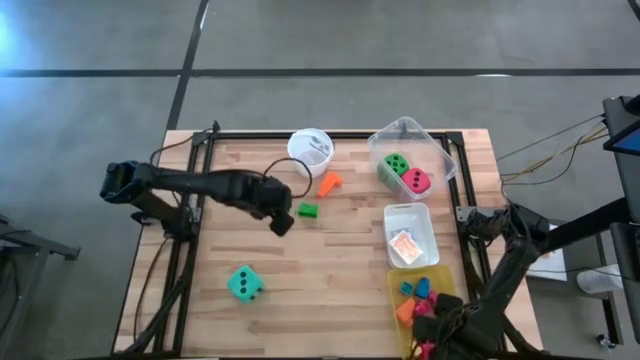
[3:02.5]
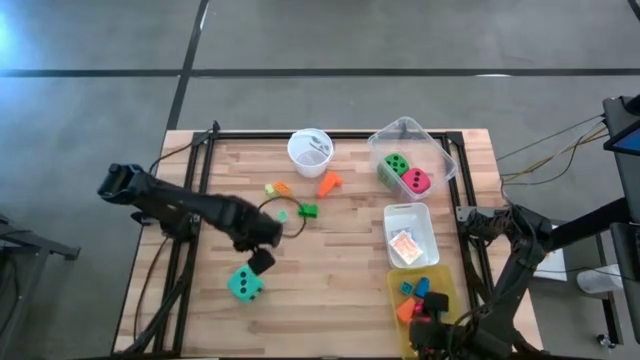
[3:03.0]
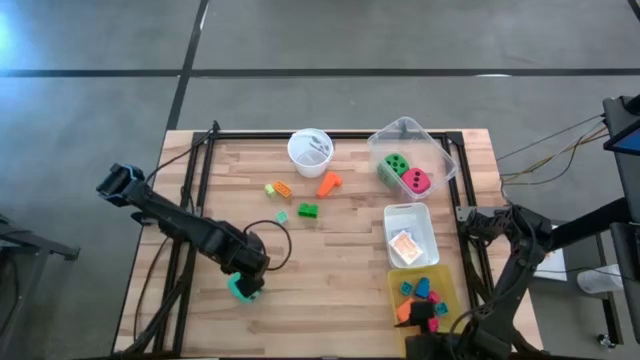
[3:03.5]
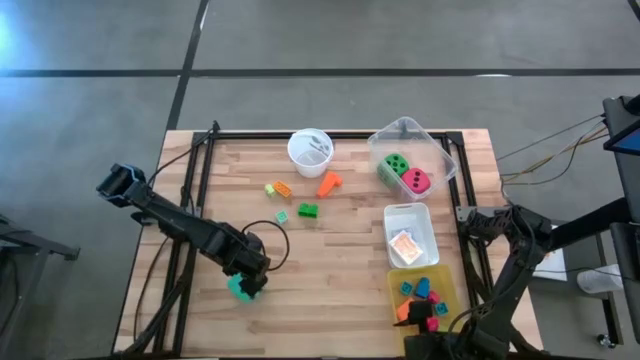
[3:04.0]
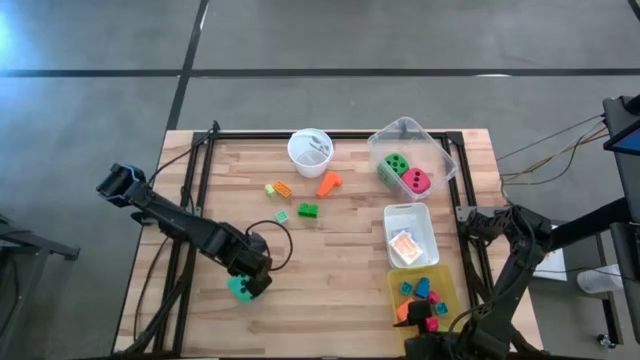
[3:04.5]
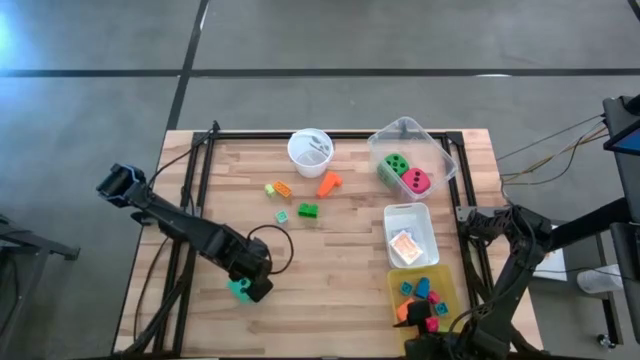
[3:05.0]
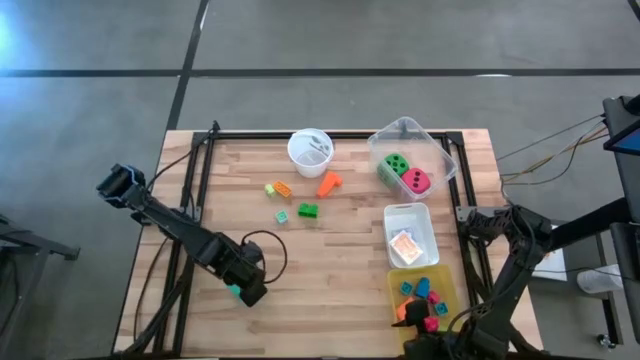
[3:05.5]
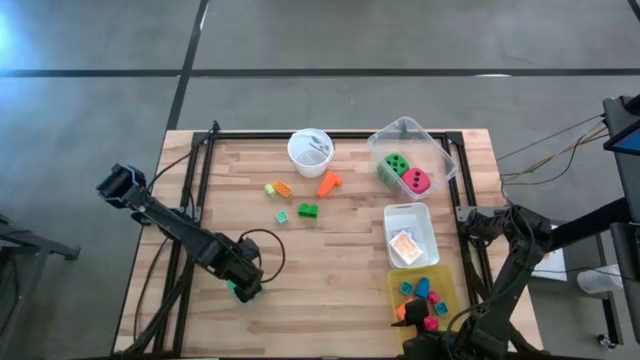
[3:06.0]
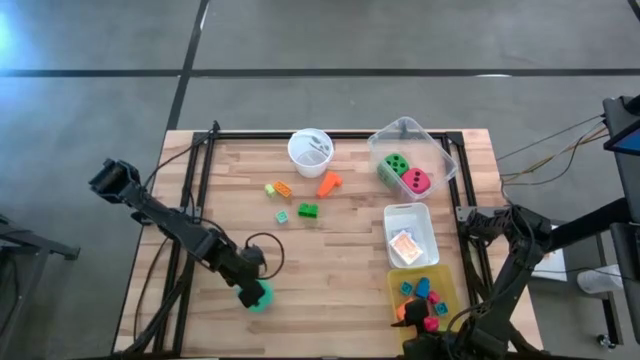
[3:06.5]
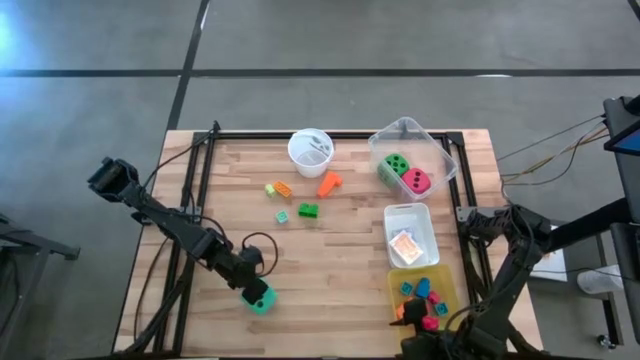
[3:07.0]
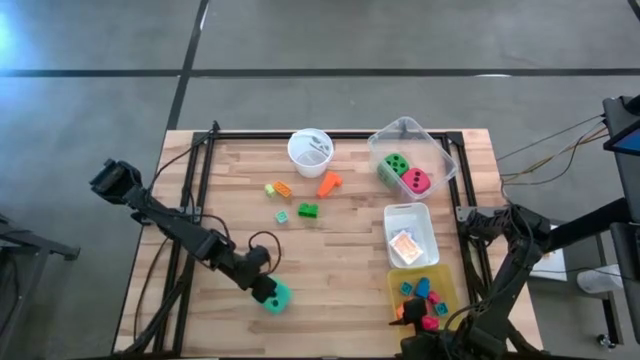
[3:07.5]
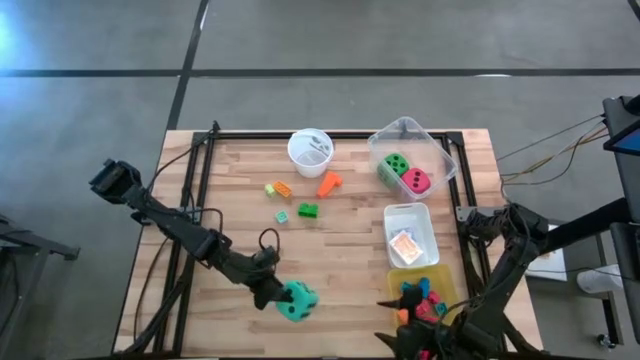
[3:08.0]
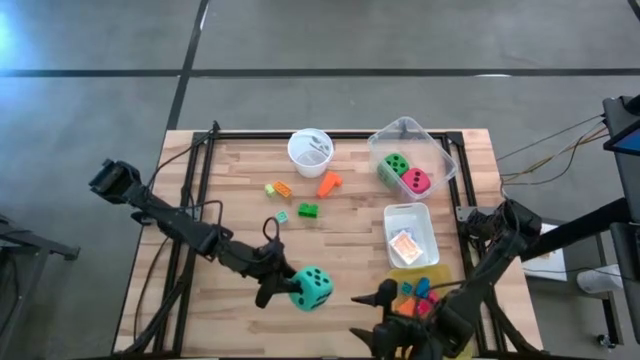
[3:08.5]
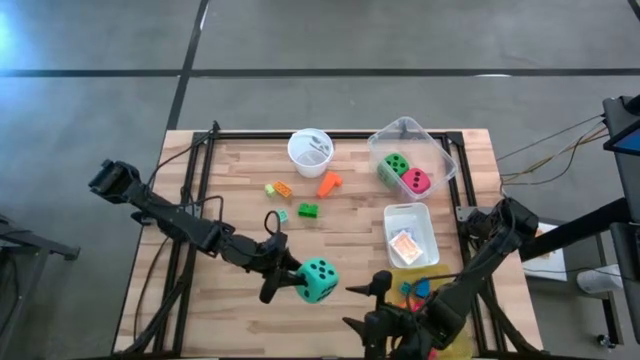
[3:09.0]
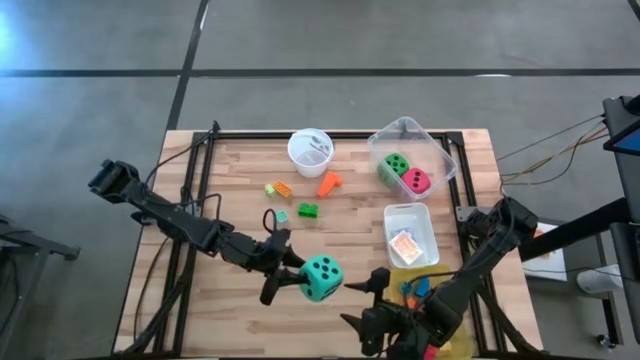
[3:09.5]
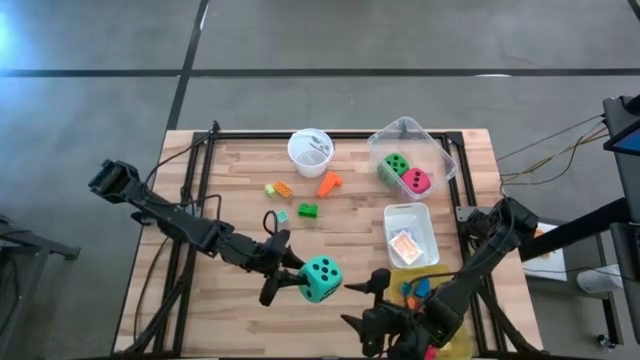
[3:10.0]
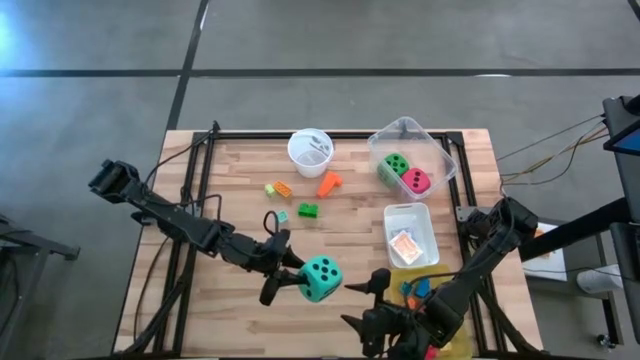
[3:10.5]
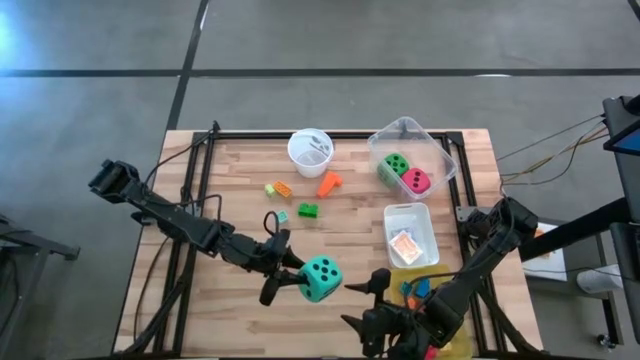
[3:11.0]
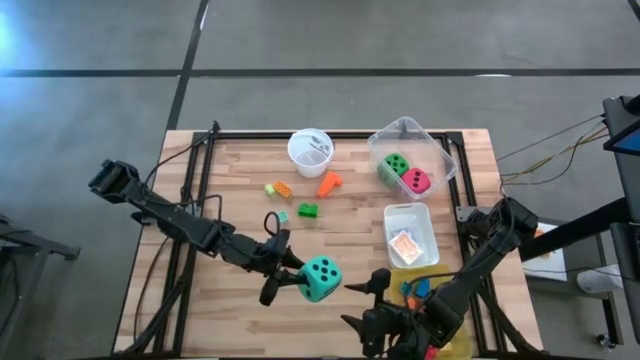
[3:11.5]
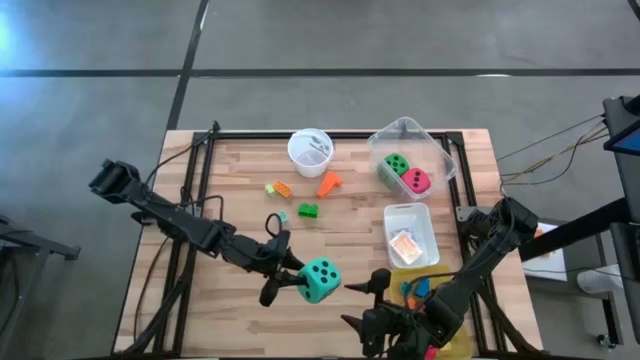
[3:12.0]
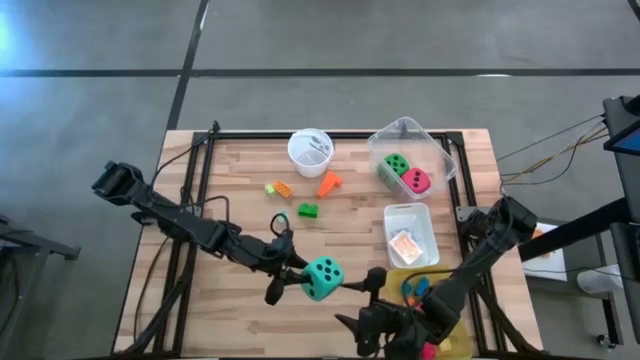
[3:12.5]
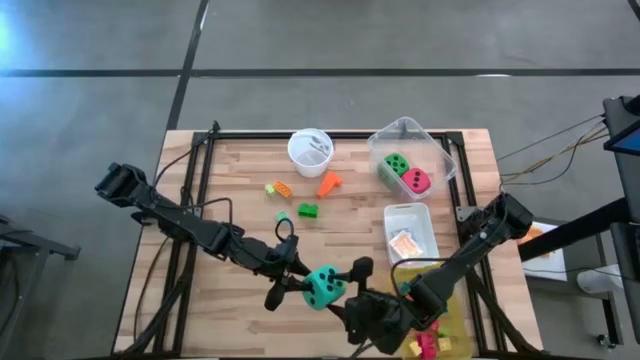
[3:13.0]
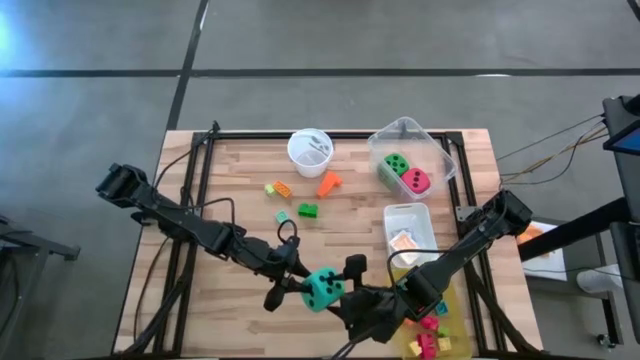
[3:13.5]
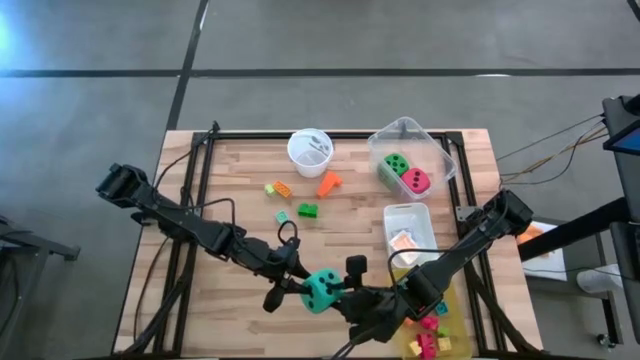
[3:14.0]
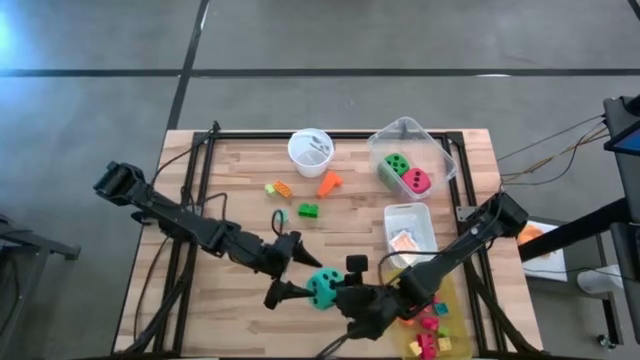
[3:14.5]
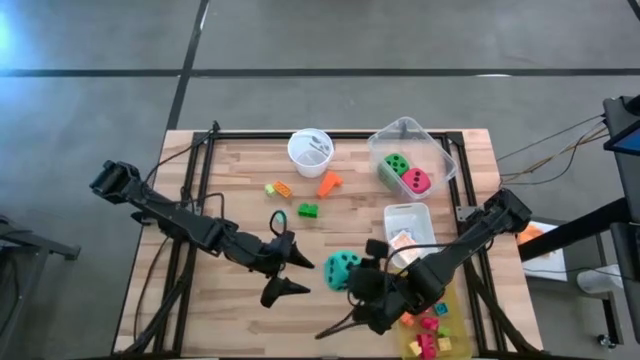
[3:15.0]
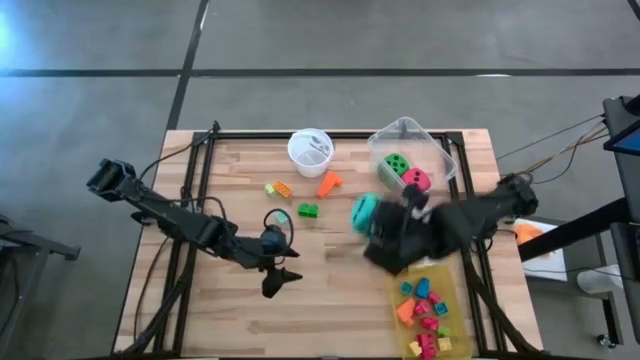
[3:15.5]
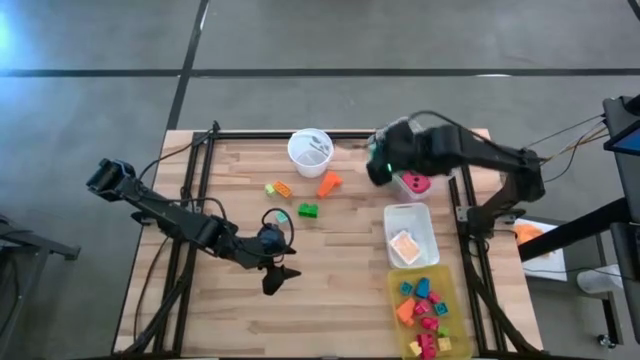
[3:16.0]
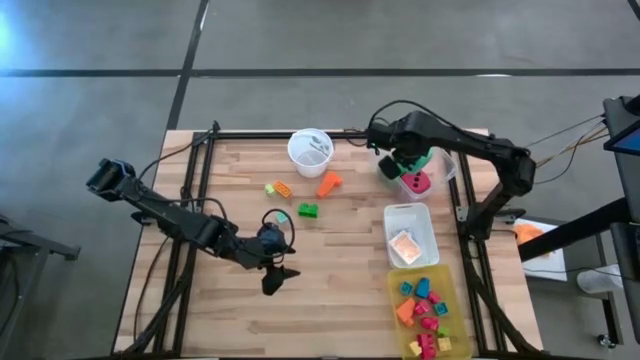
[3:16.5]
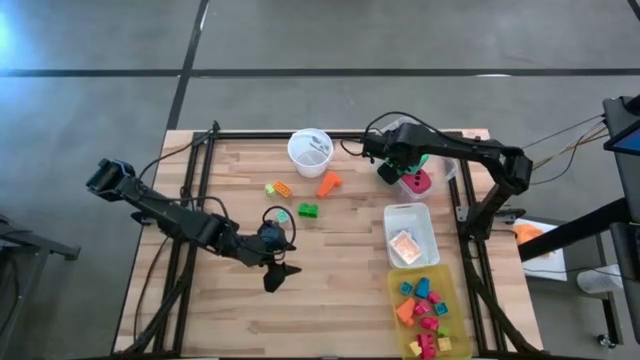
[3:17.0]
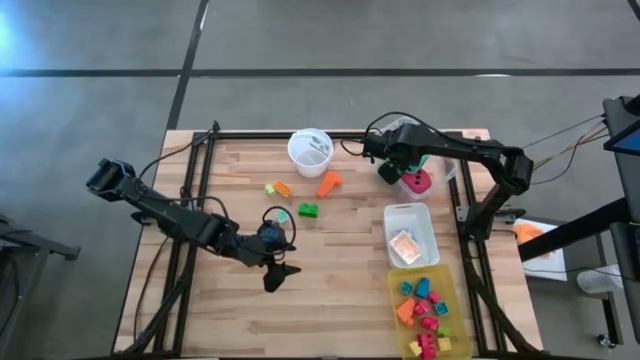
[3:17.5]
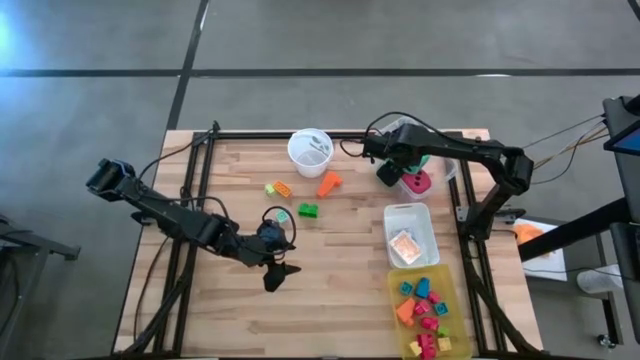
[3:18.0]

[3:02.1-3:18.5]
Task: Pick & Place Toys
Put the light blue dice into the transparent bin

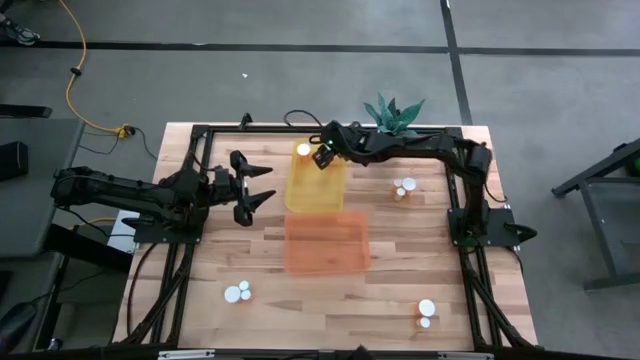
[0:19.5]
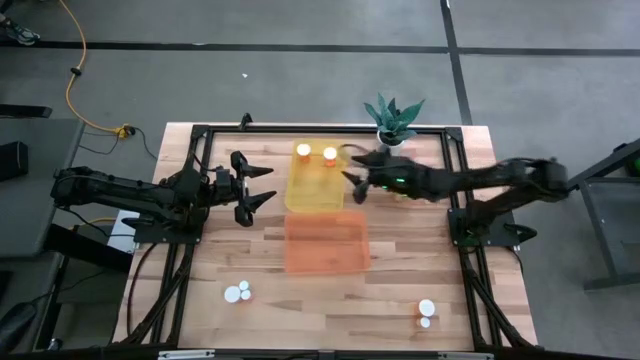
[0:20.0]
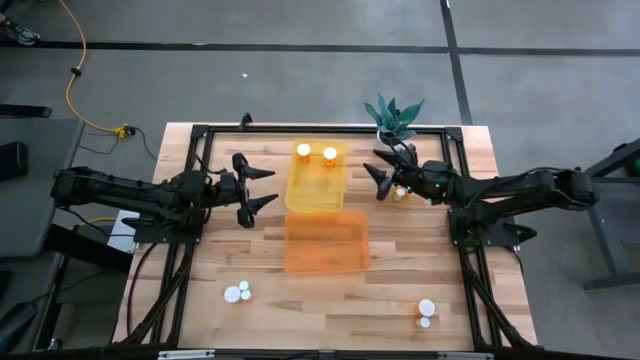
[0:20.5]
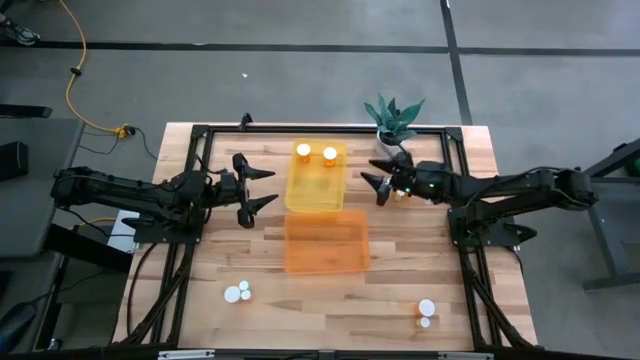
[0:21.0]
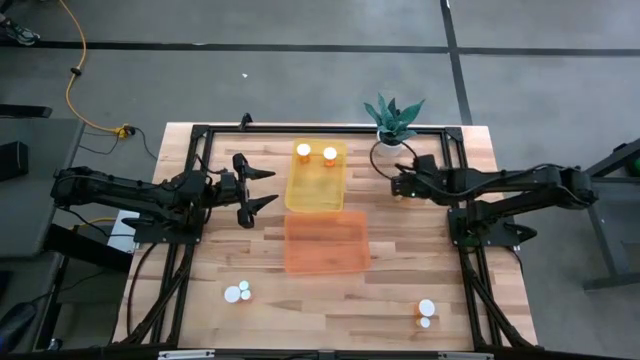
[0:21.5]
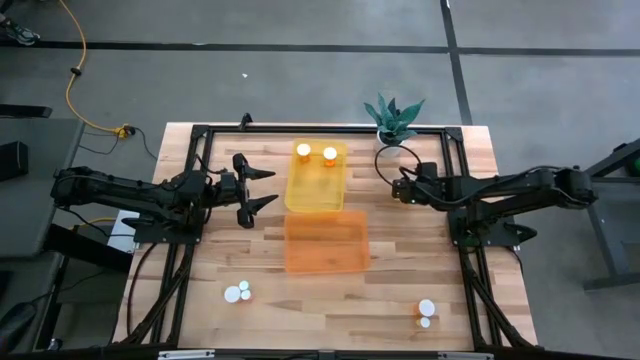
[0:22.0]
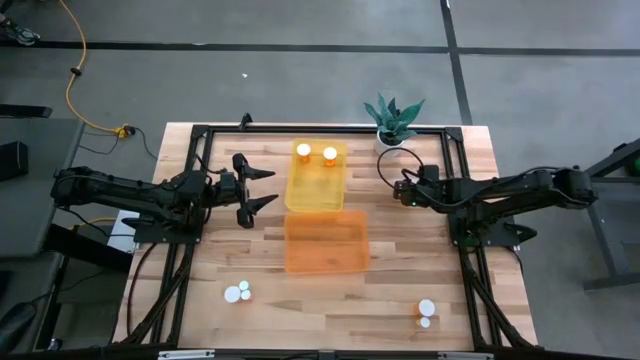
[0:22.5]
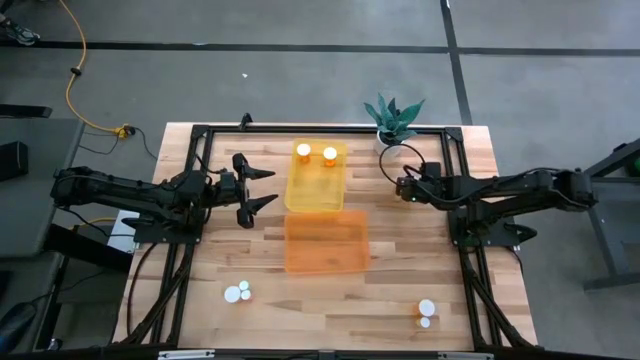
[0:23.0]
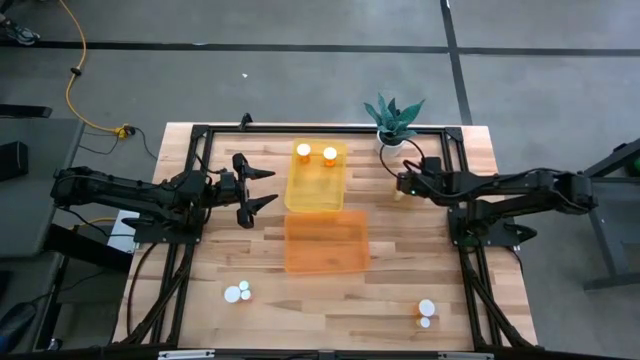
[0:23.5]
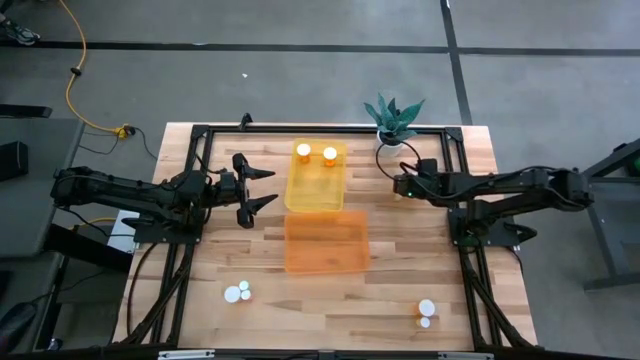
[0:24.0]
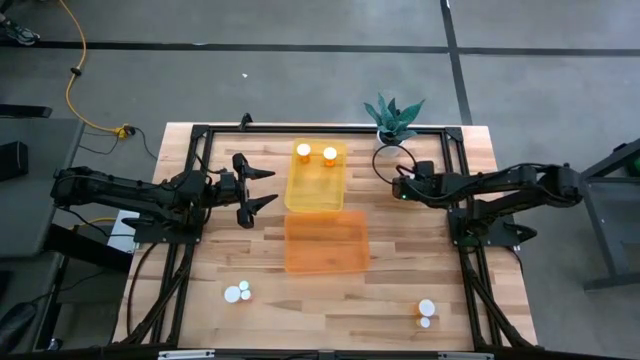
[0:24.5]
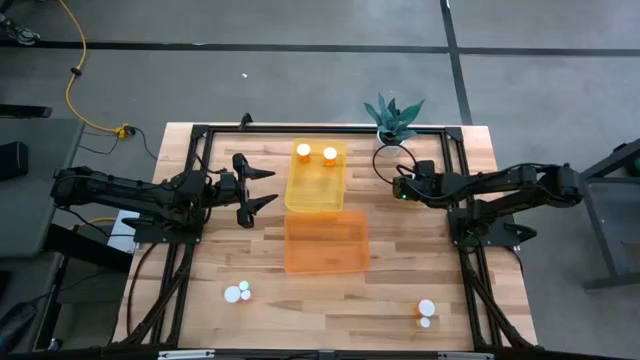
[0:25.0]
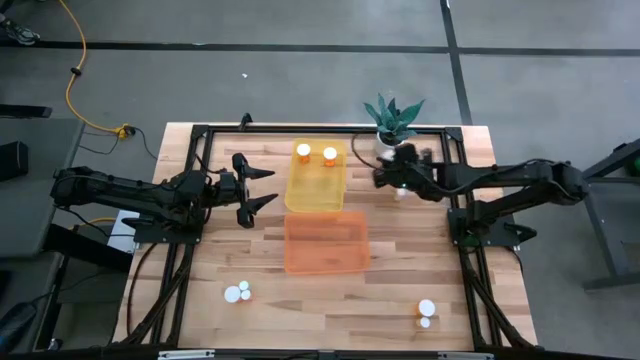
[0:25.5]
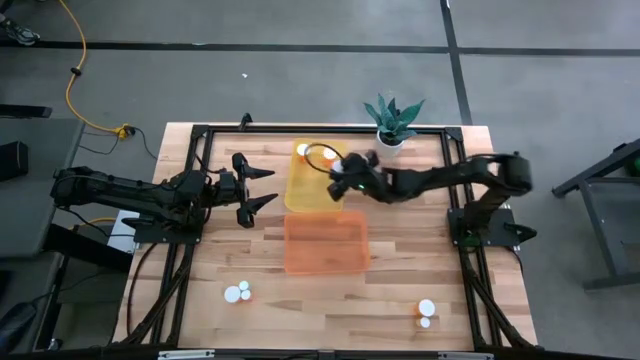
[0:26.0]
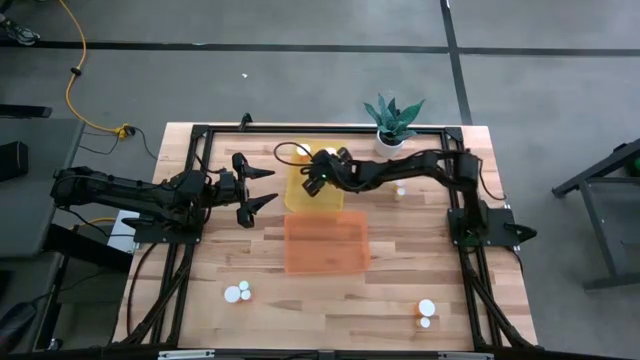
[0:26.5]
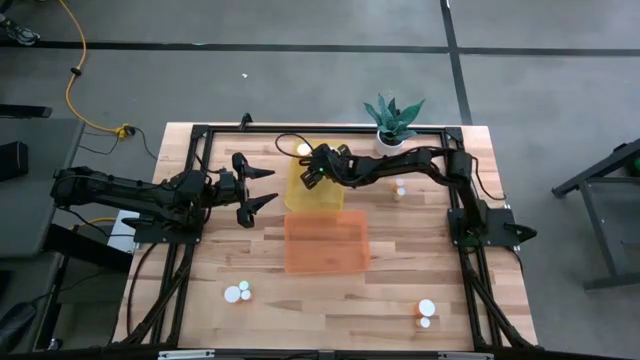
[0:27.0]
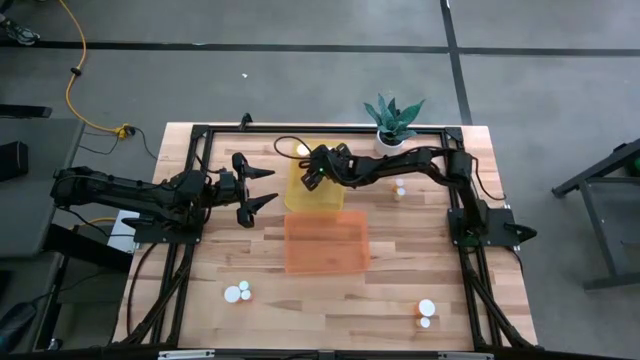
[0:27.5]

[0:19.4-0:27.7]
Task: Pick and place medicine bottles into bin by pill shape (circle, oval)
Put the yellow capsule bottle into the yellow bin
